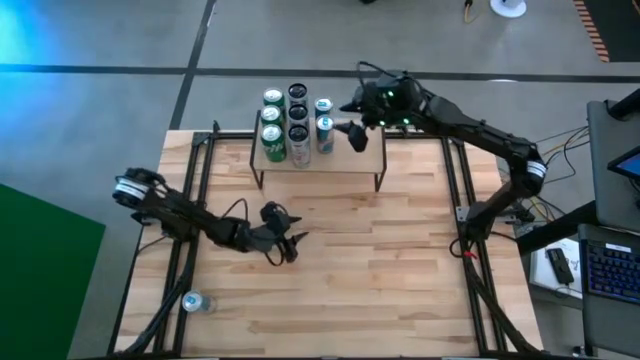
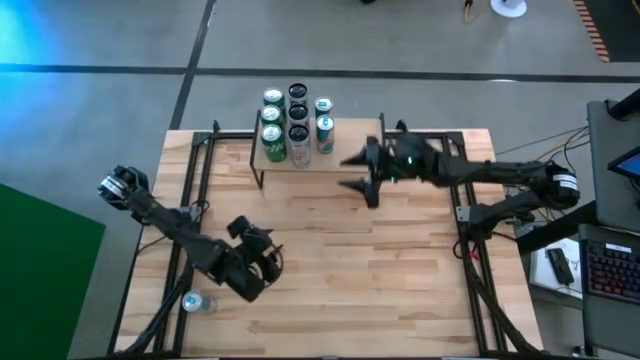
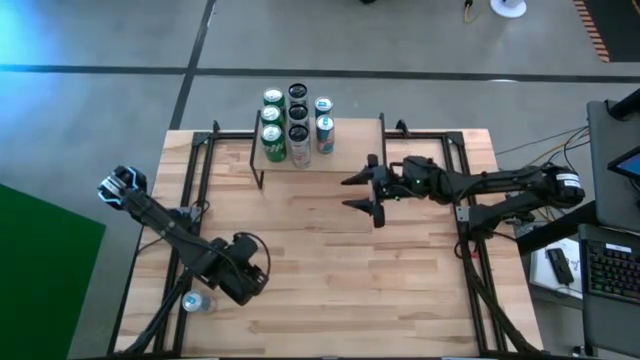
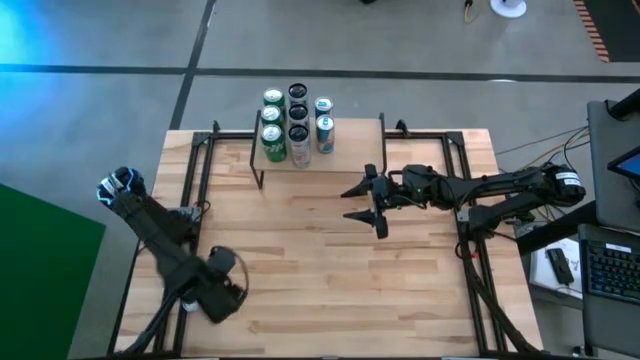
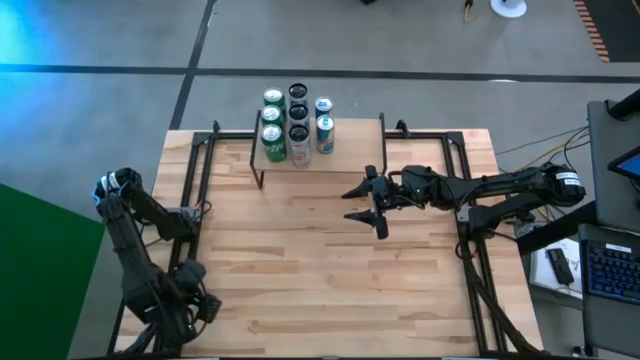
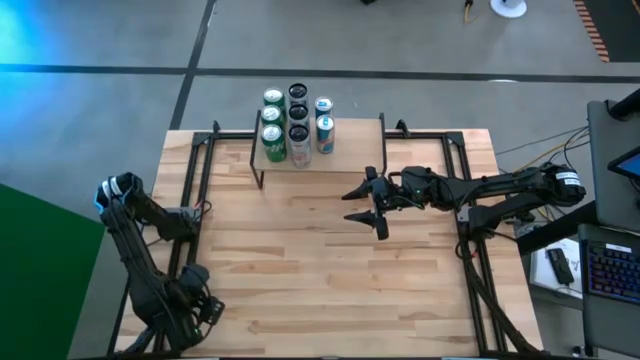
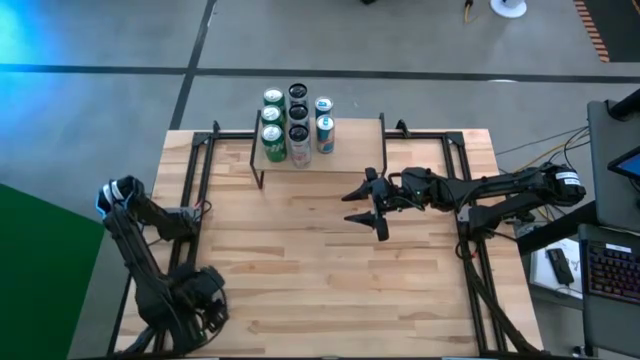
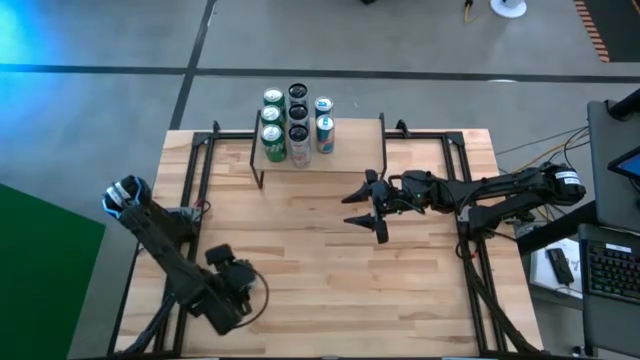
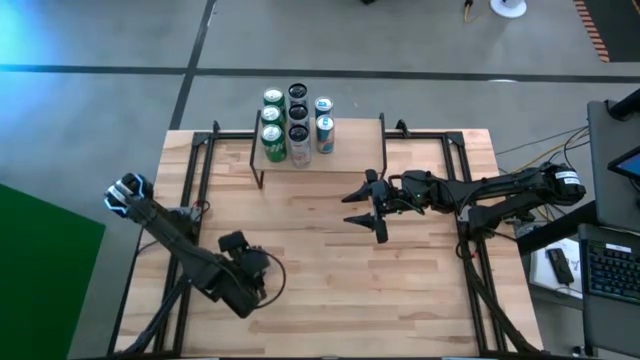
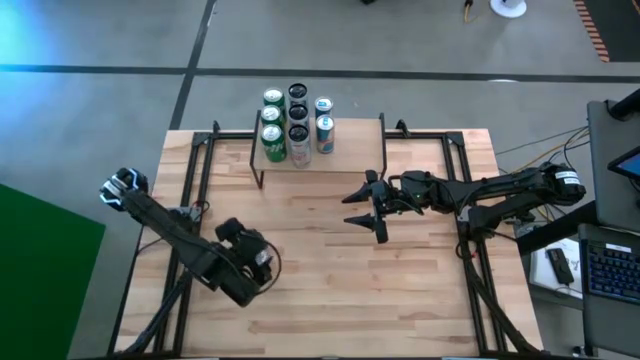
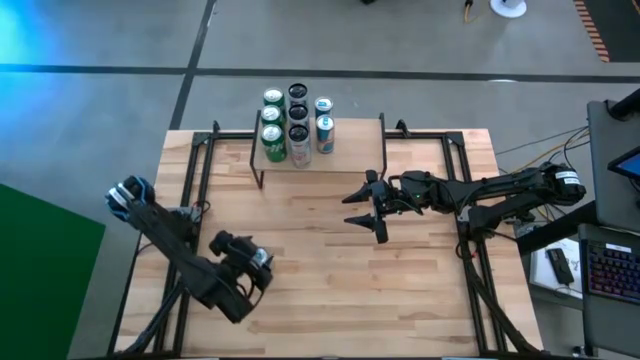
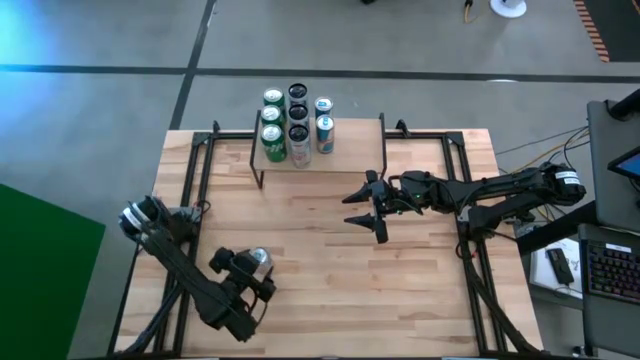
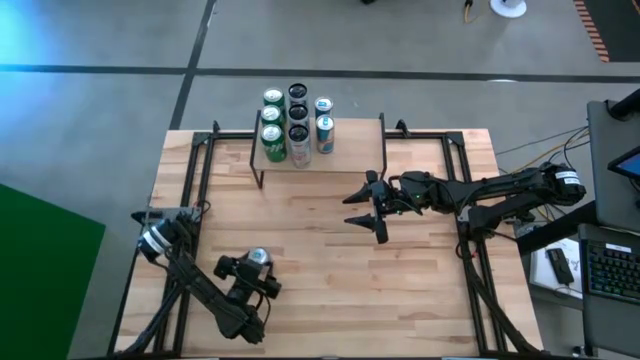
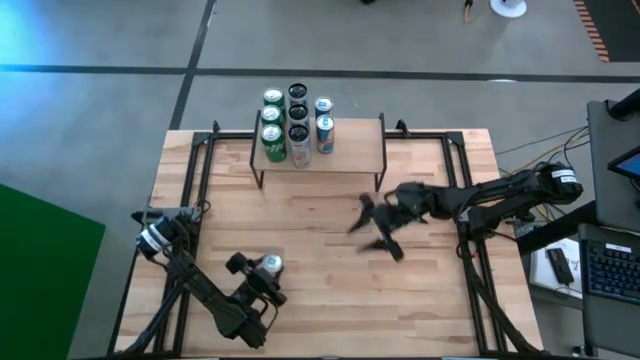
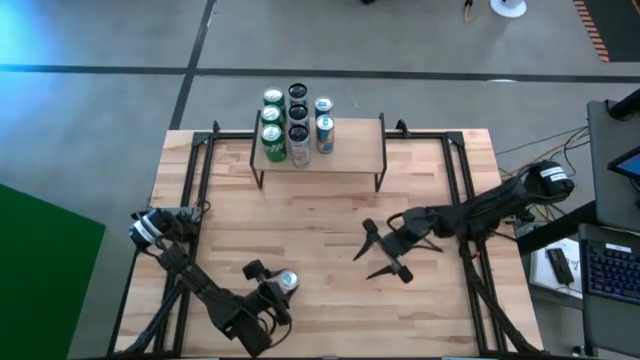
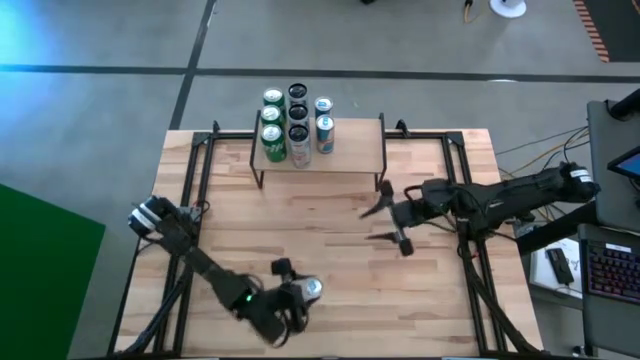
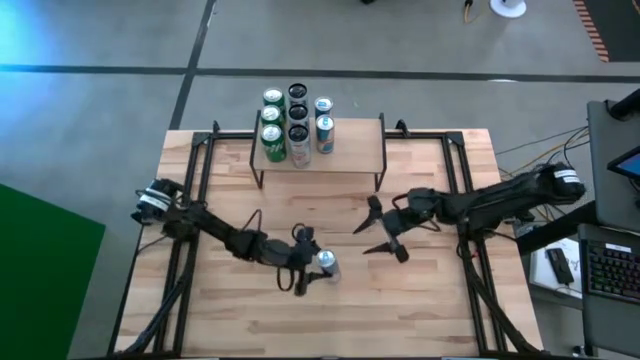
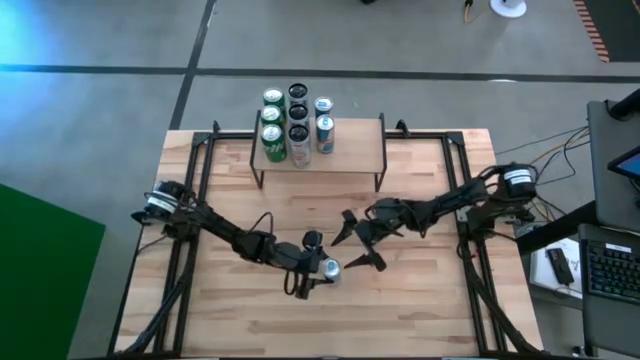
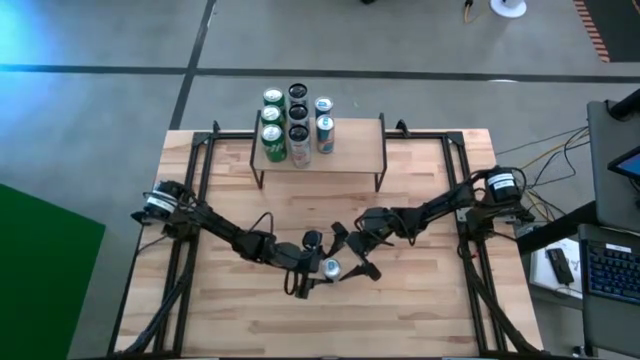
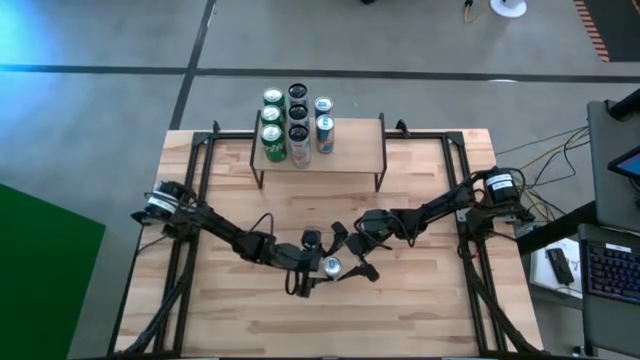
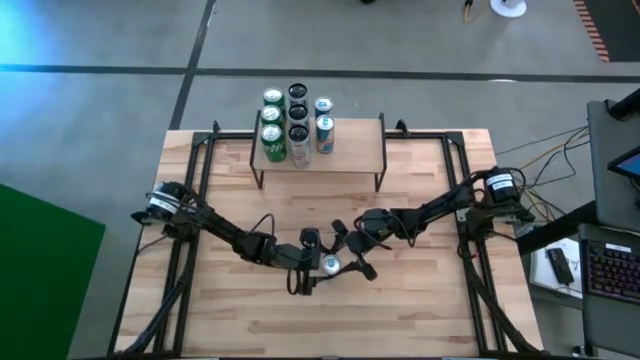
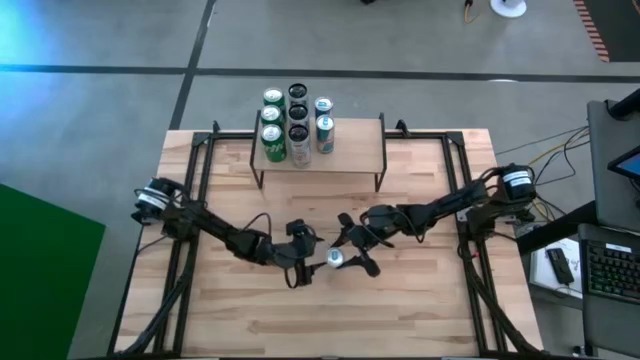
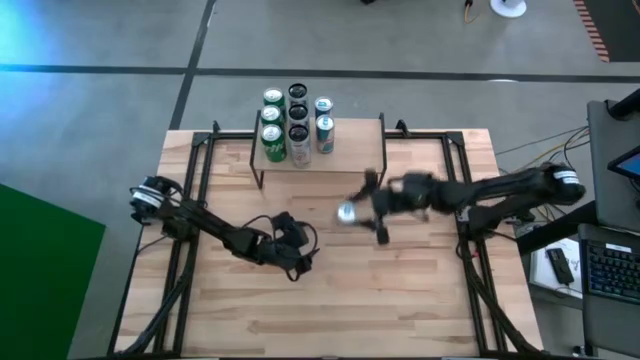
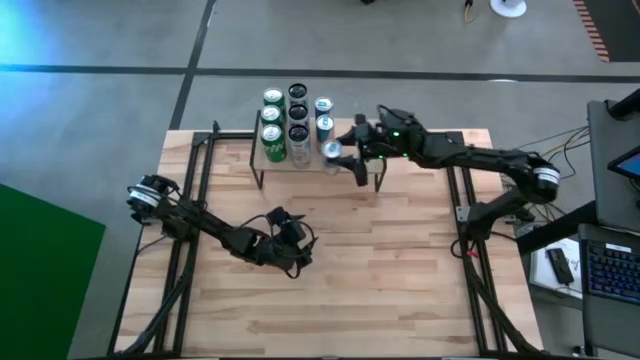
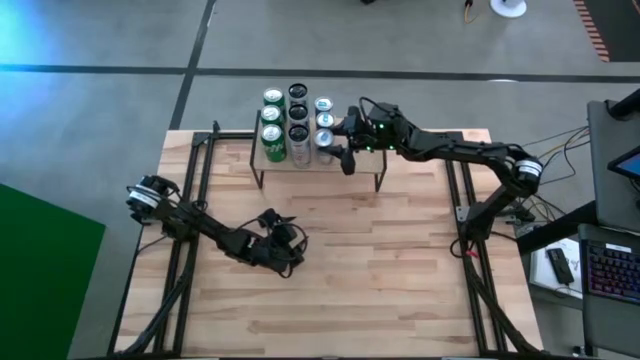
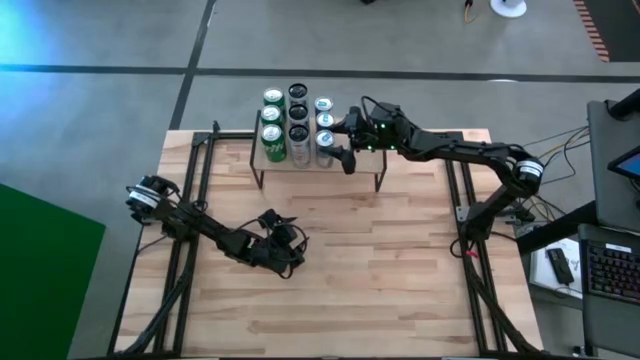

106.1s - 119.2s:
Task: Place canned beverage on shelf
Put the blue soda can on the shelf aligned with other blue soda cans

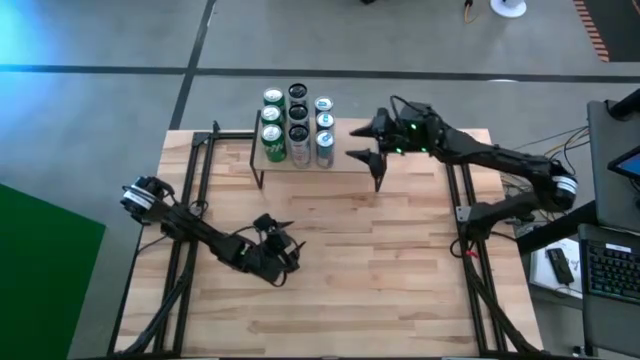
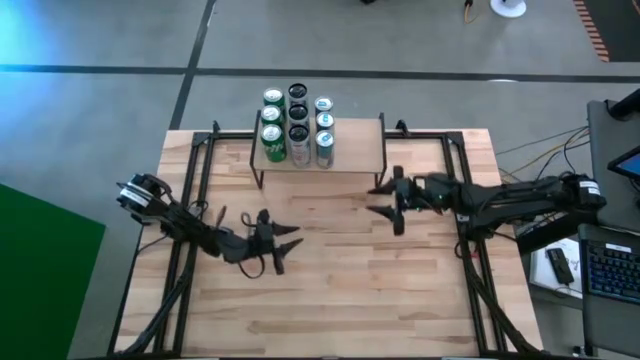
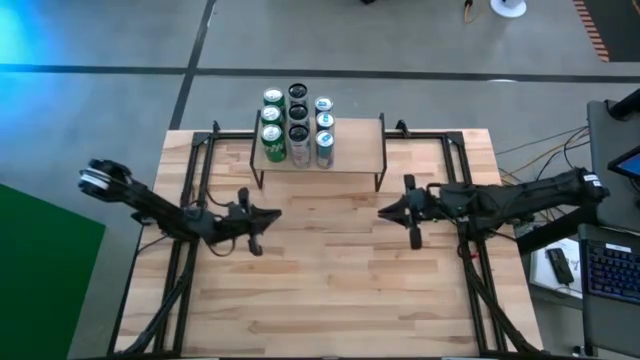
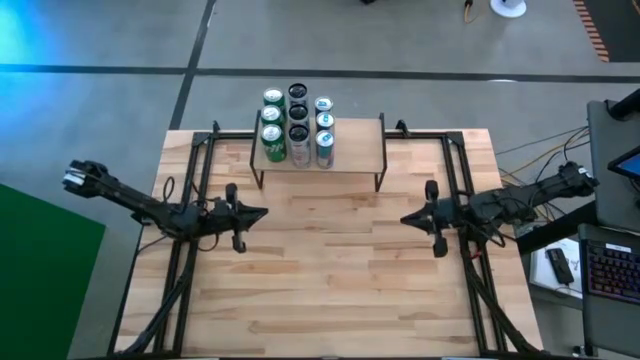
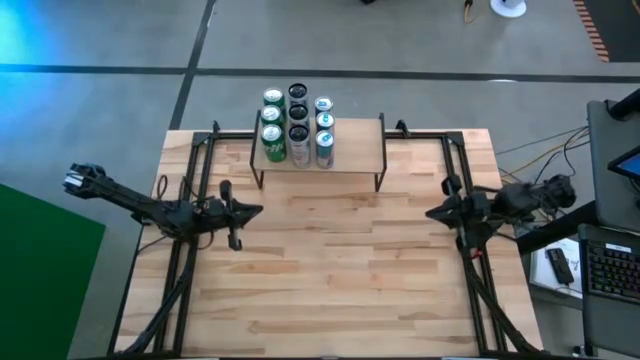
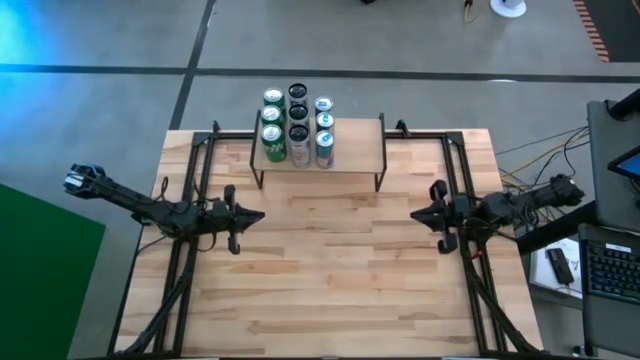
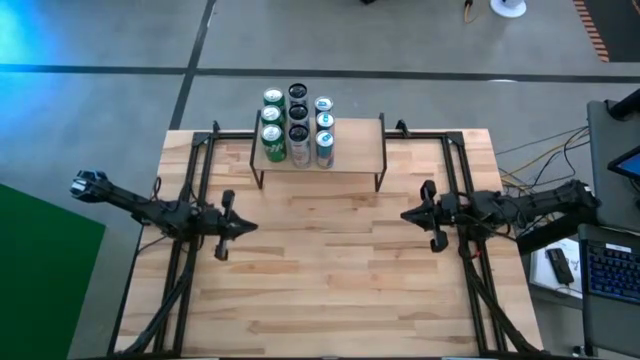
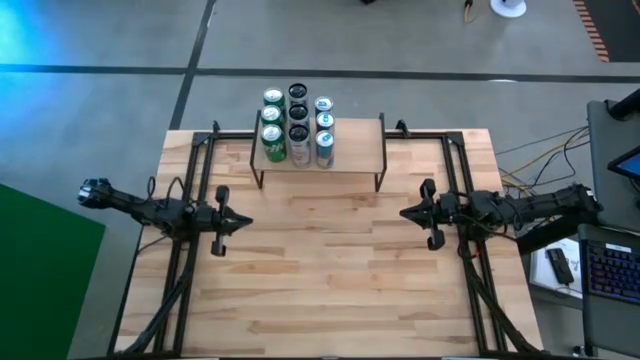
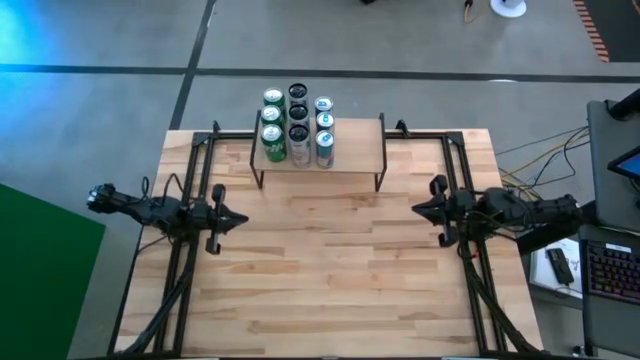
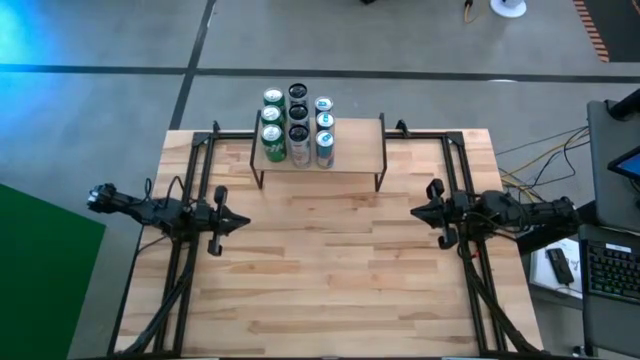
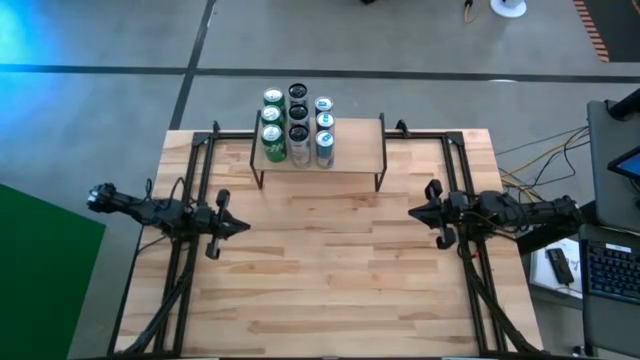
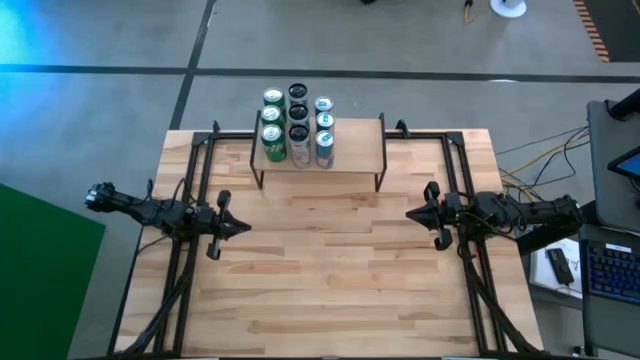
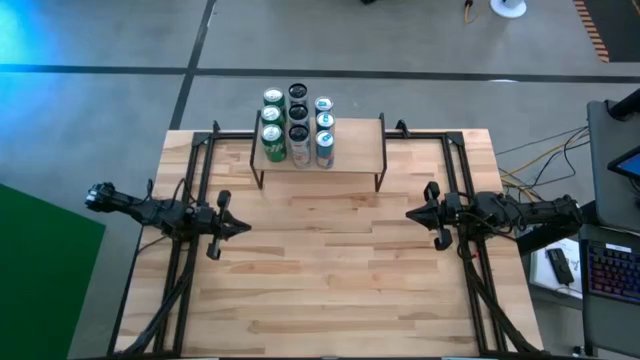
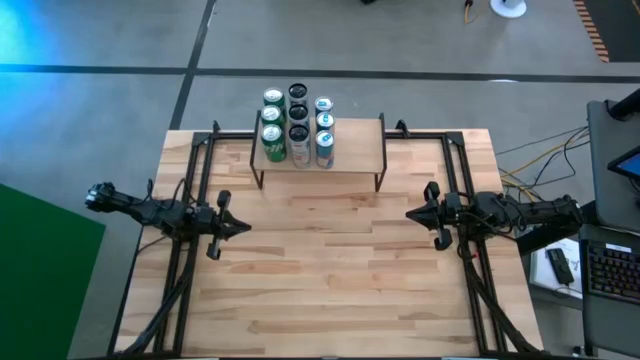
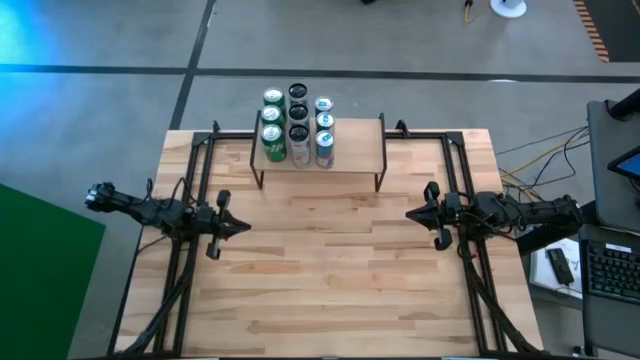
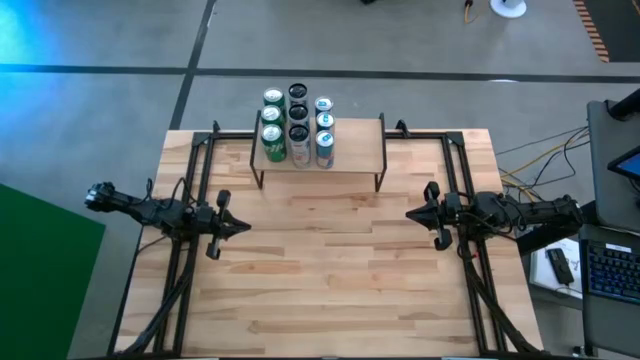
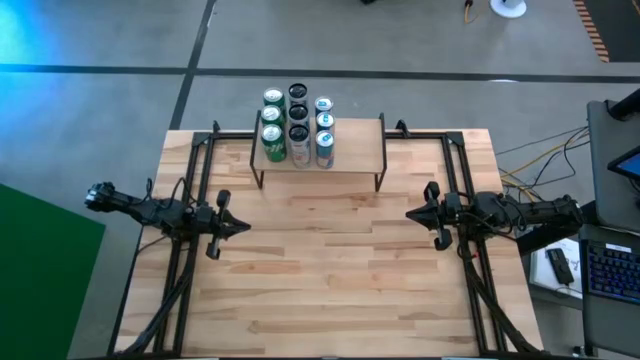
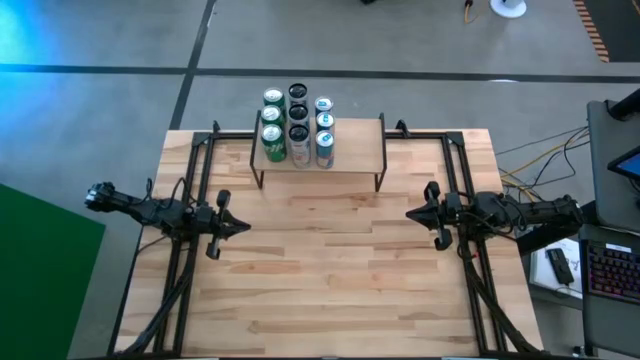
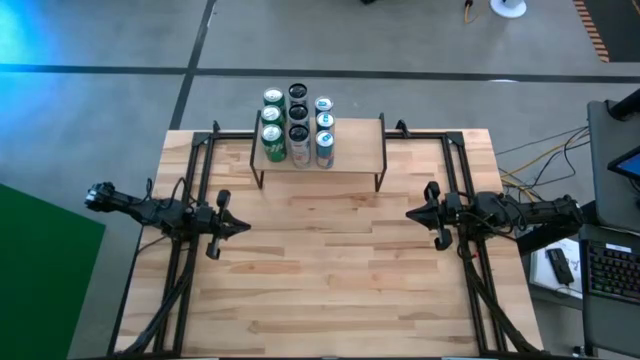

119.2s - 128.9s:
Return to Home Position
